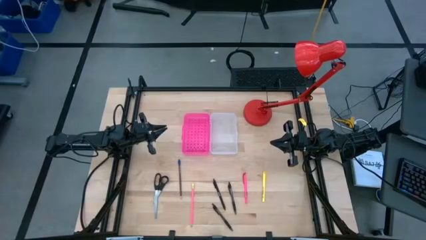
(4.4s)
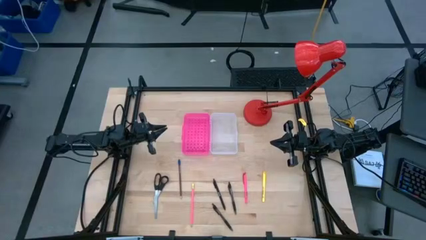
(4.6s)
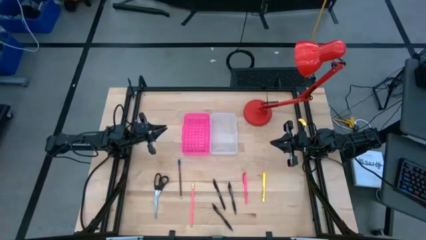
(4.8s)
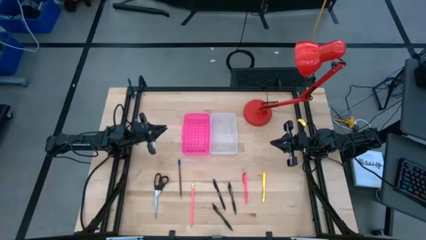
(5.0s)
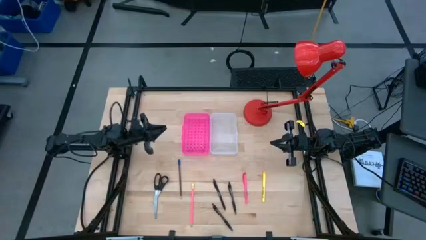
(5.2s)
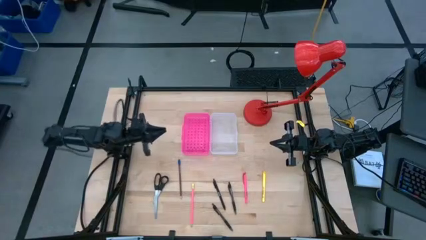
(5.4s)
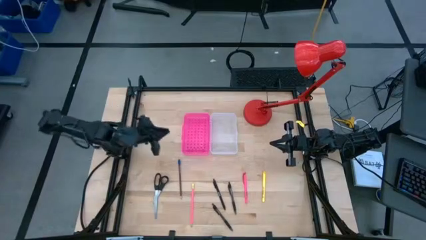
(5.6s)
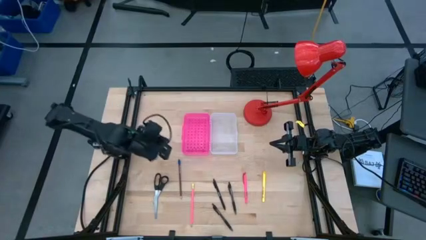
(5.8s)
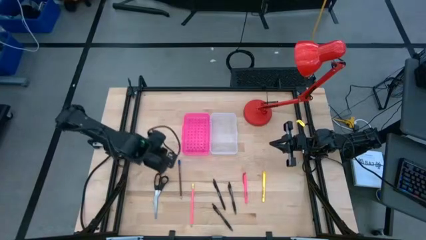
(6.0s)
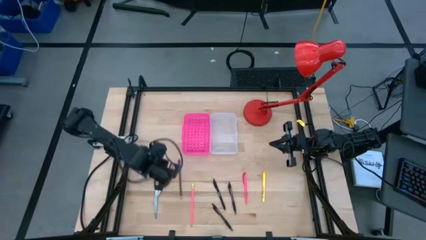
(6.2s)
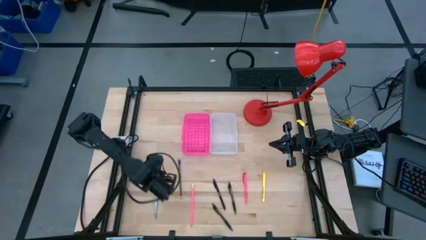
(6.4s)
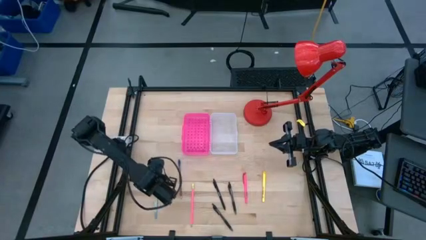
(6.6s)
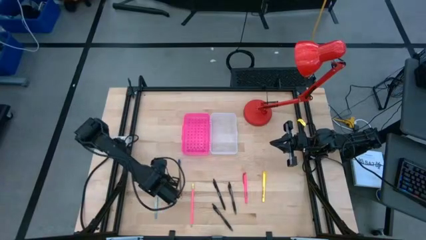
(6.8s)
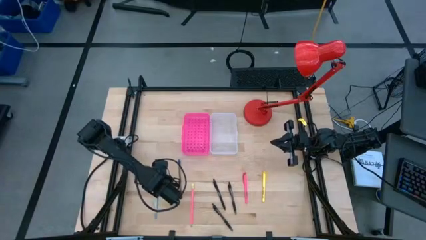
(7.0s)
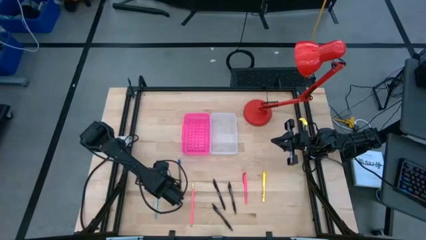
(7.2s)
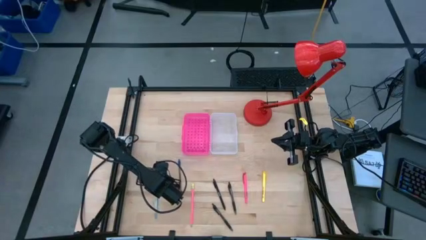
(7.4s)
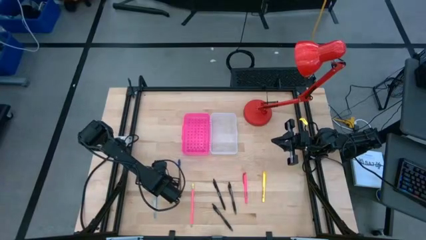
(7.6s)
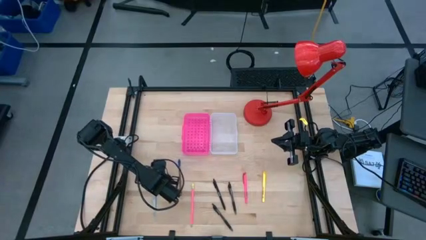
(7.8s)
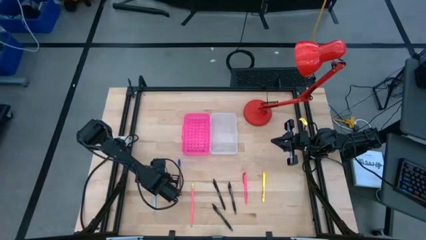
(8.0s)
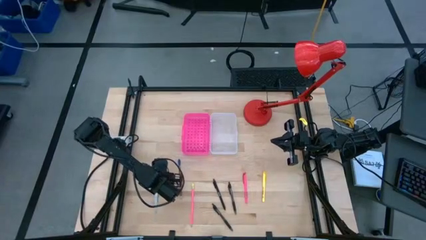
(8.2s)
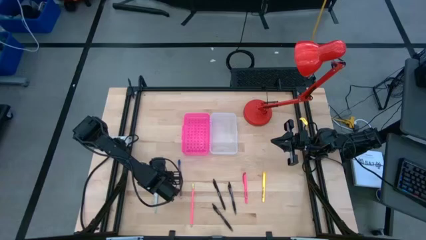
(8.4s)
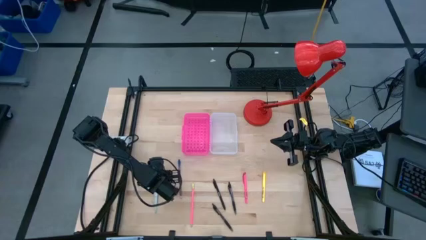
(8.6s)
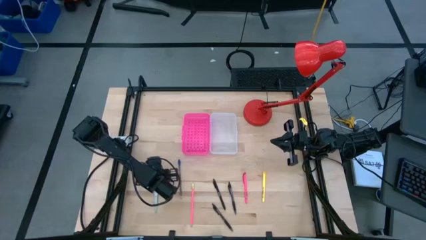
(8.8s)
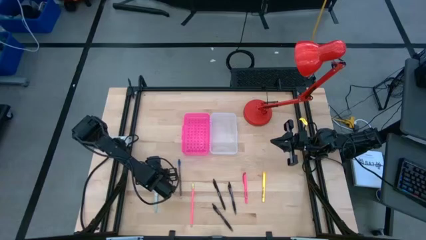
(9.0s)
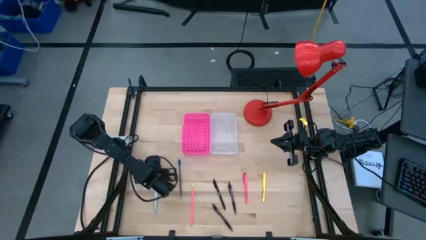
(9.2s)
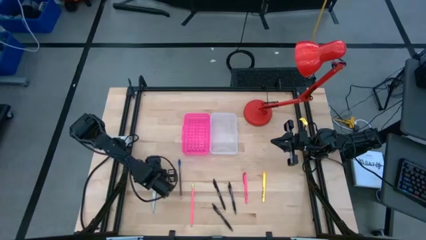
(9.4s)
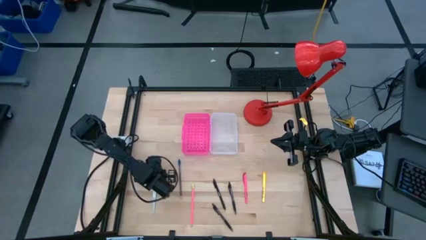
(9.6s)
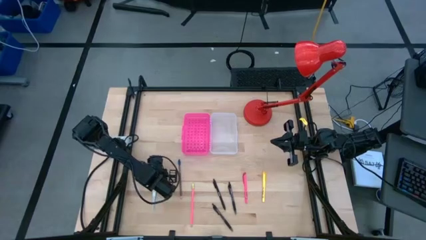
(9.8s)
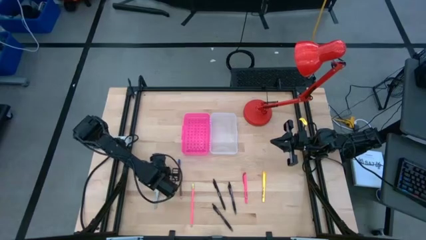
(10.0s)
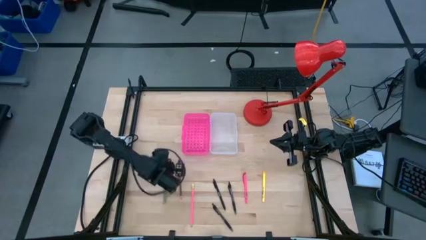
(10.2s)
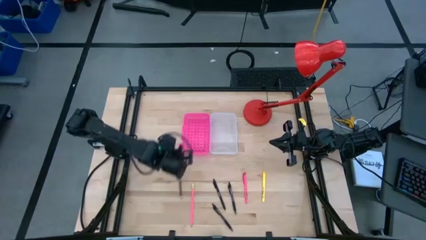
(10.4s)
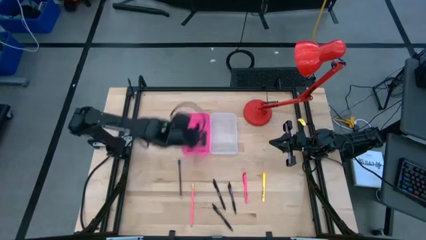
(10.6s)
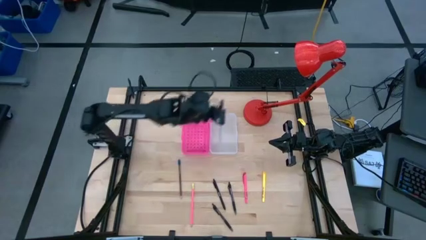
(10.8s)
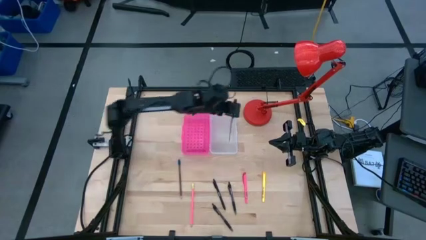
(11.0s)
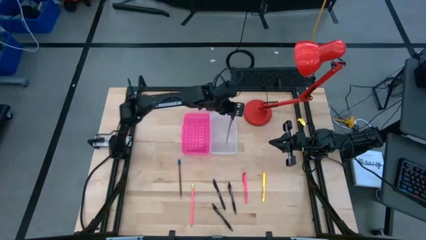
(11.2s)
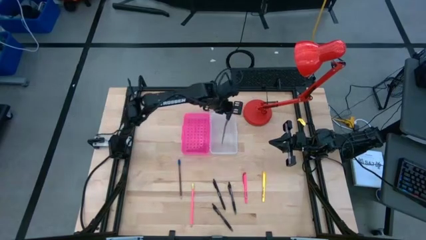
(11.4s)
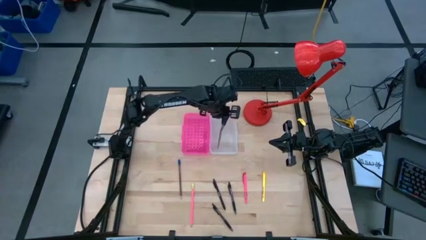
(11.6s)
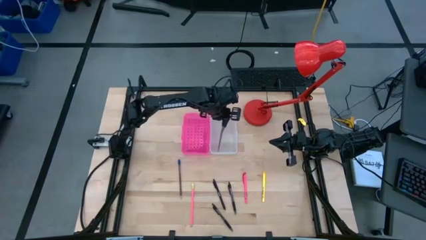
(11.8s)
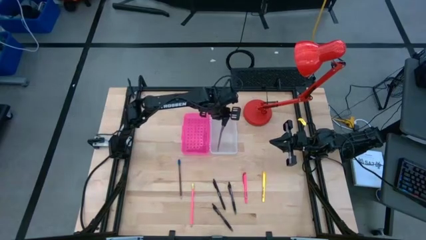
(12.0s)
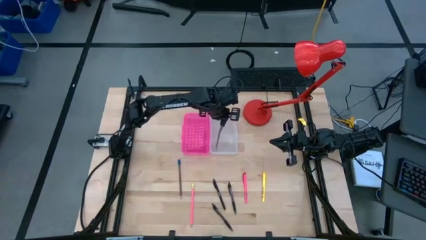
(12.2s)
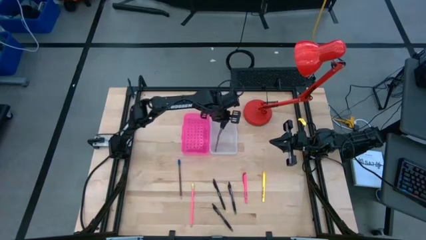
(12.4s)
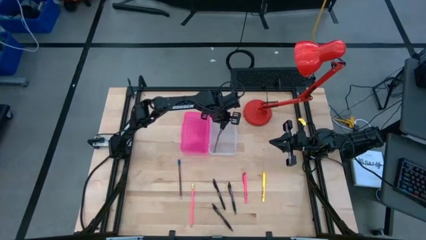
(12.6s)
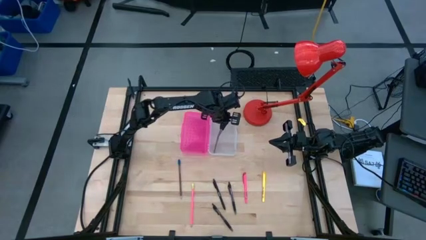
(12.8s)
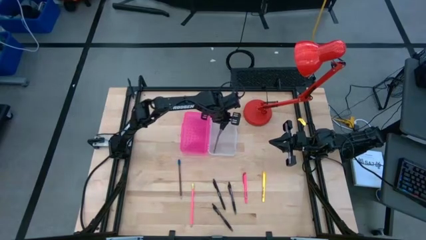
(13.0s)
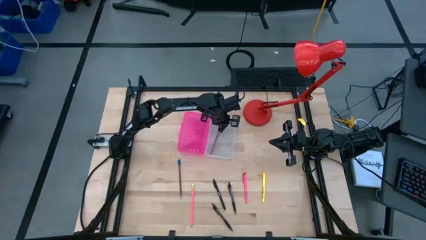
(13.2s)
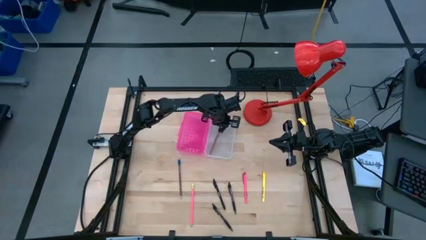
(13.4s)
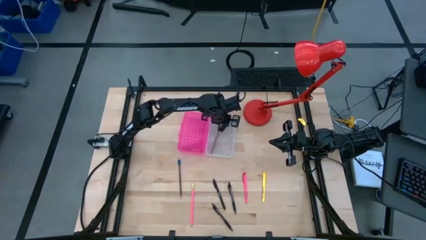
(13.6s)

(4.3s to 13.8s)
Task: Pick & place school supplies into a supply box
Put the black scissors into the pink supply box

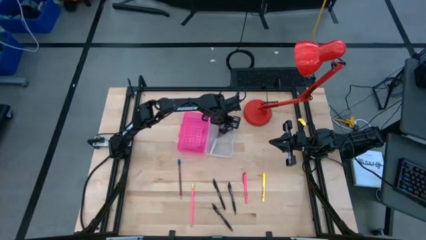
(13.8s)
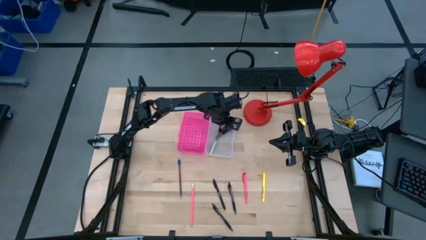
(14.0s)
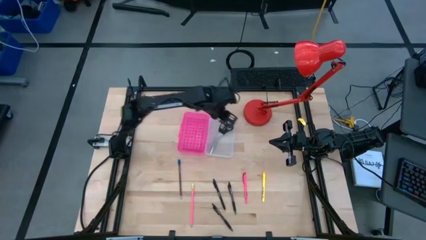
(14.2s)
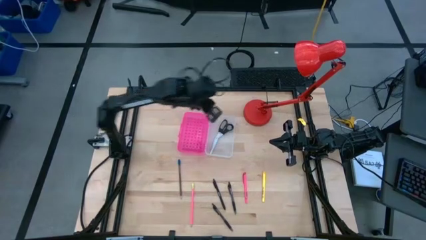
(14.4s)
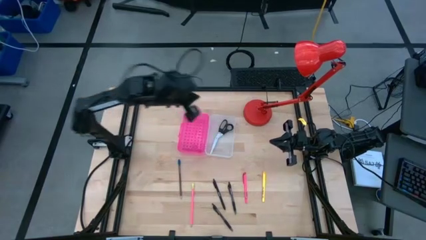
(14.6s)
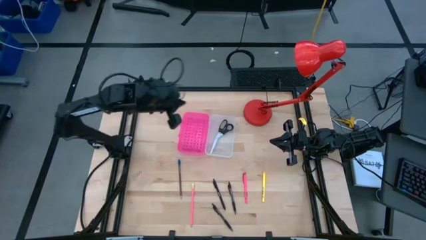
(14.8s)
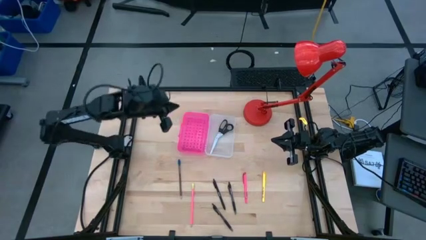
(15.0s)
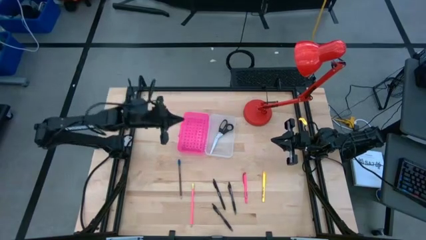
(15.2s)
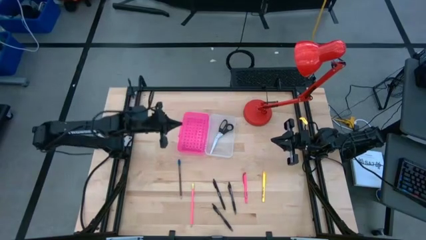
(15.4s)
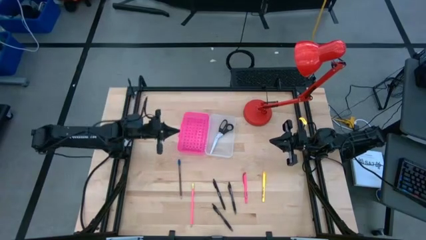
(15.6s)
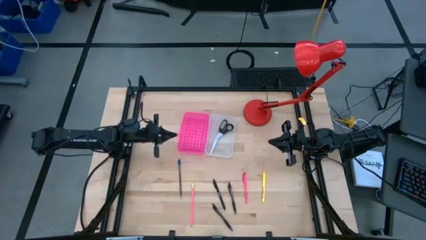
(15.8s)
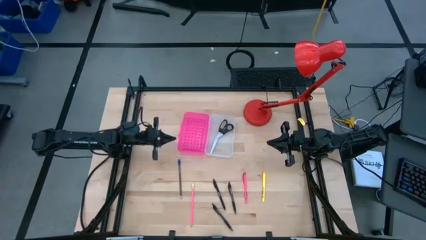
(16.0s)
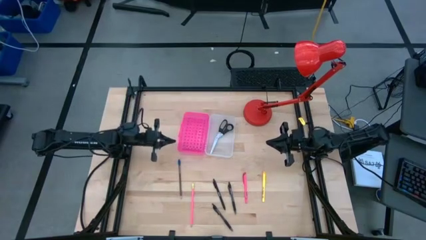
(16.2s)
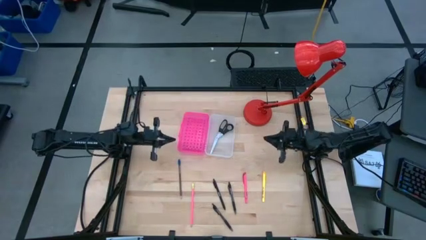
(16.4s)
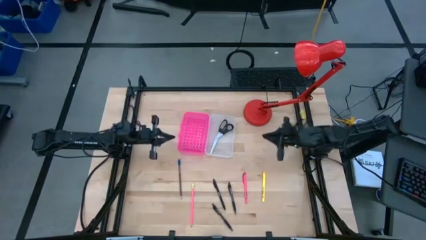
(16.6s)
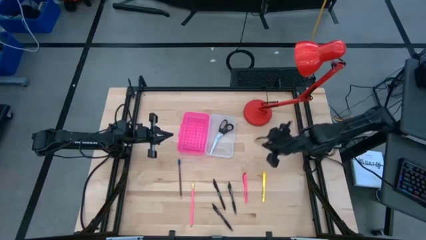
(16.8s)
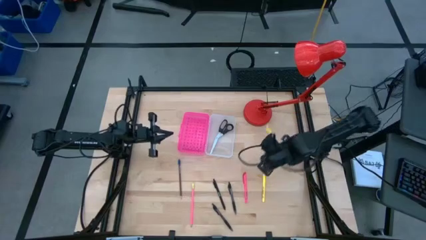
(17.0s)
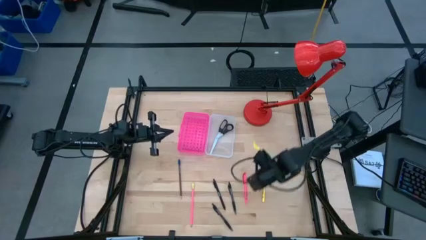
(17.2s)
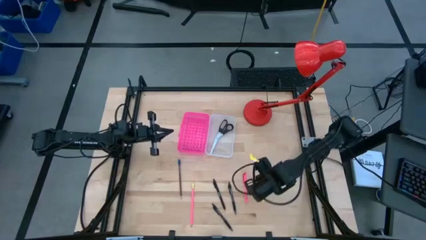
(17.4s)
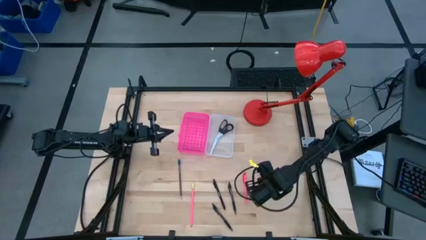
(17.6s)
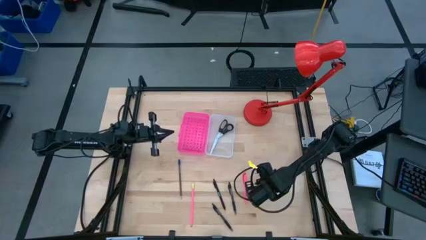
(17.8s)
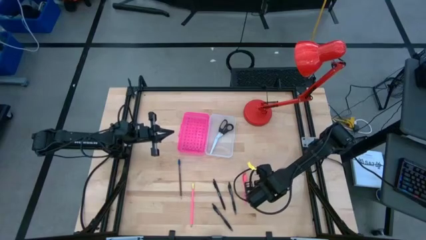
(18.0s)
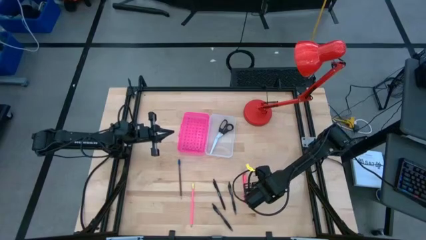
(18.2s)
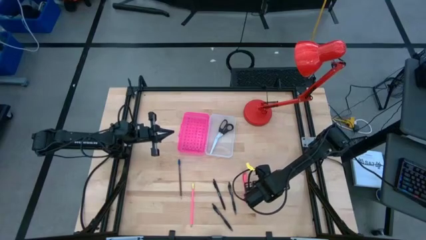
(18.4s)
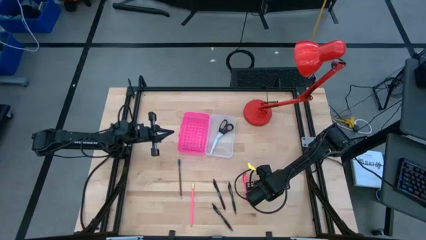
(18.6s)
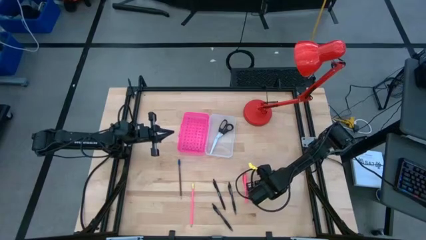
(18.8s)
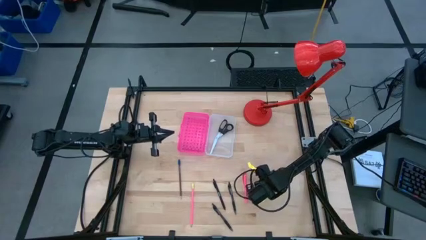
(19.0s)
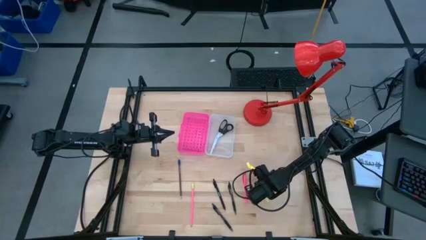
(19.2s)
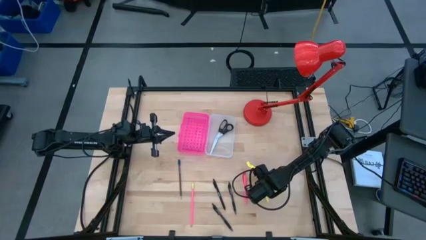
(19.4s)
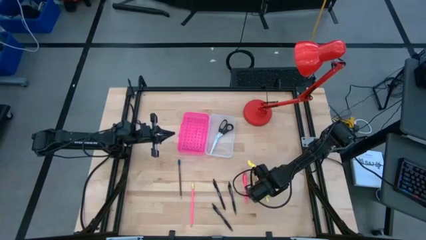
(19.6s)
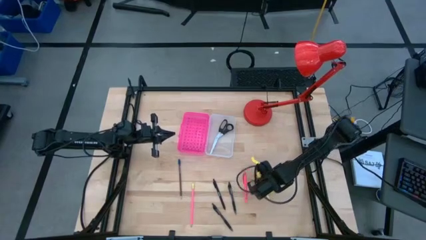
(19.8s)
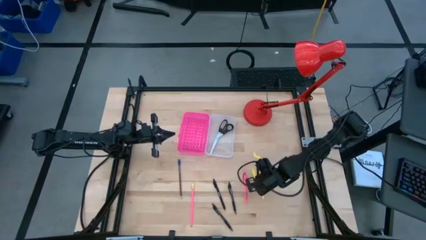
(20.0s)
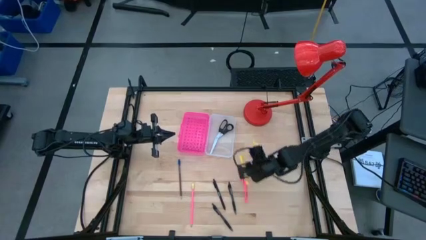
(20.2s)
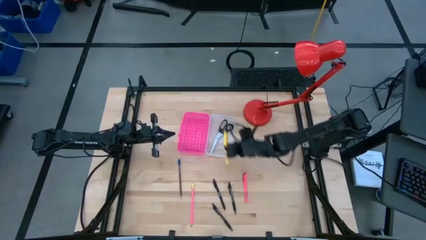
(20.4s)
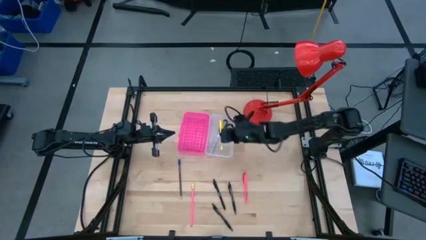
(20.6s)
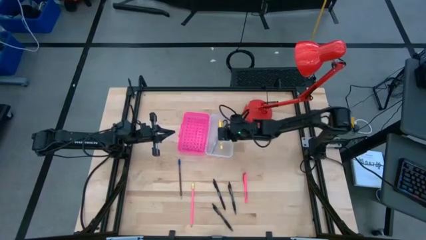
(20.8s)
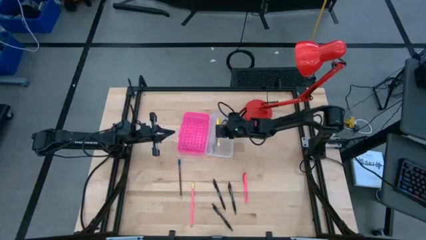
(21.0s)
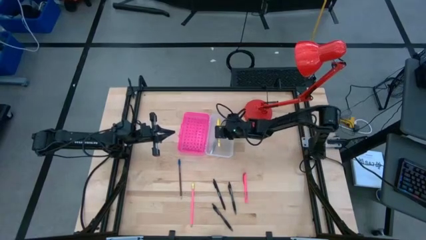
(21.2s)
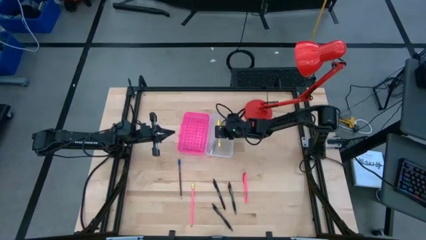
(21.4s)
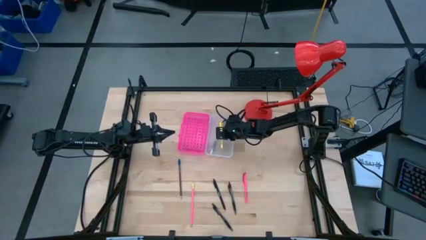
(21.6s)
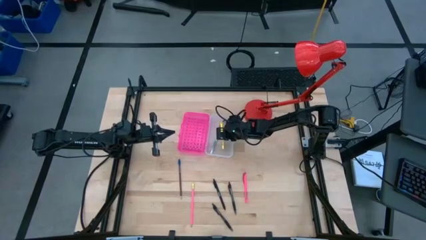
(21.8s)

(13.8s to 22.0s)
Put the yellow ballpen into the pink supply box
